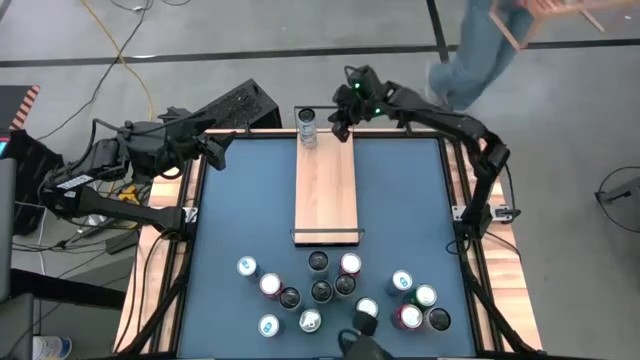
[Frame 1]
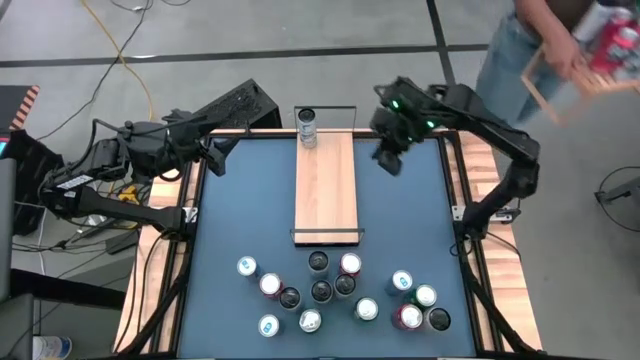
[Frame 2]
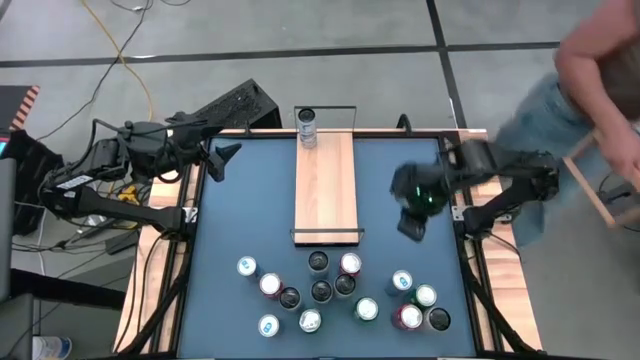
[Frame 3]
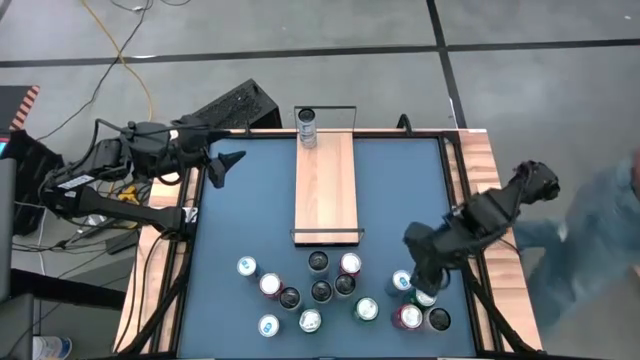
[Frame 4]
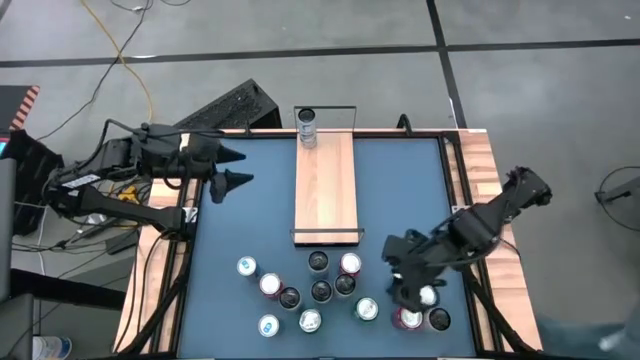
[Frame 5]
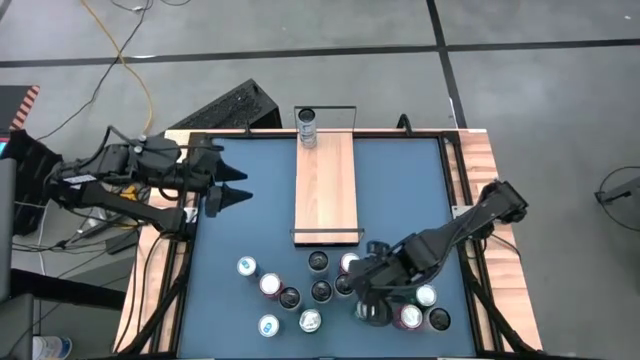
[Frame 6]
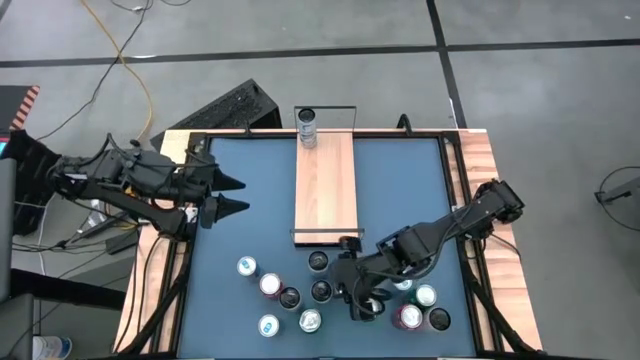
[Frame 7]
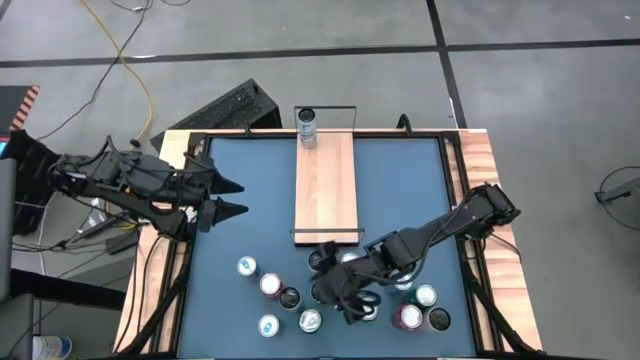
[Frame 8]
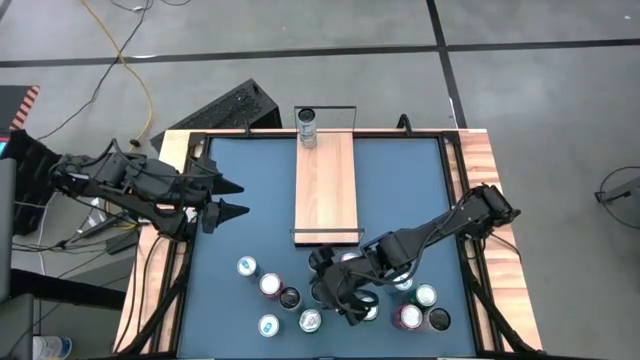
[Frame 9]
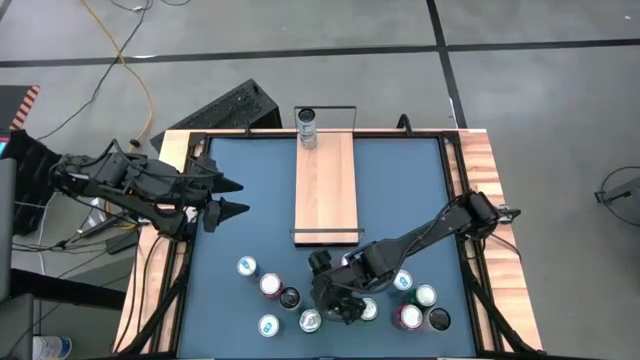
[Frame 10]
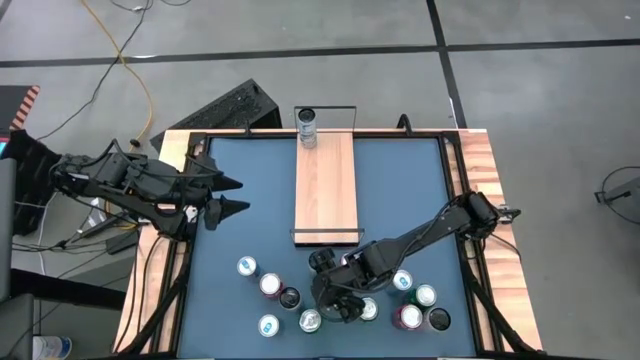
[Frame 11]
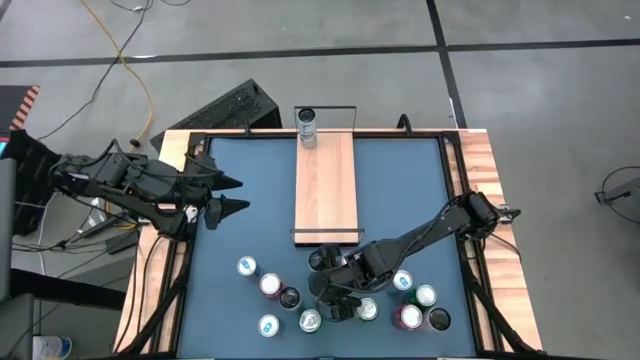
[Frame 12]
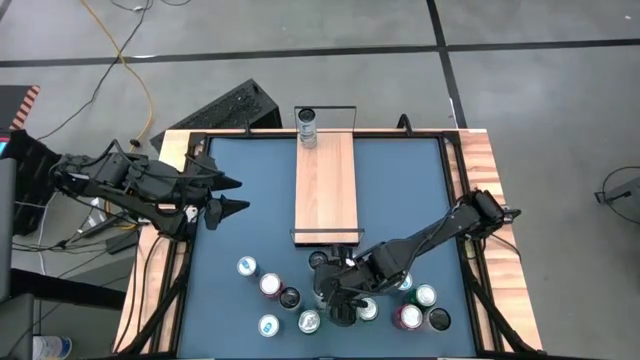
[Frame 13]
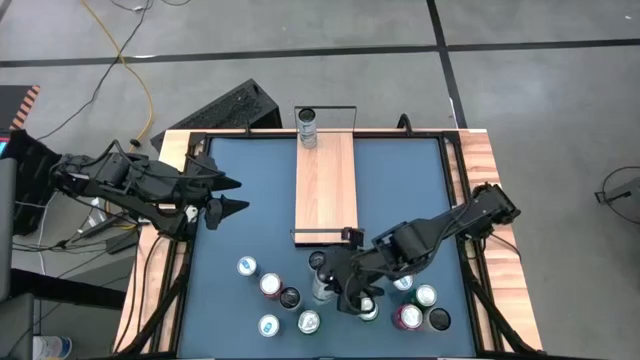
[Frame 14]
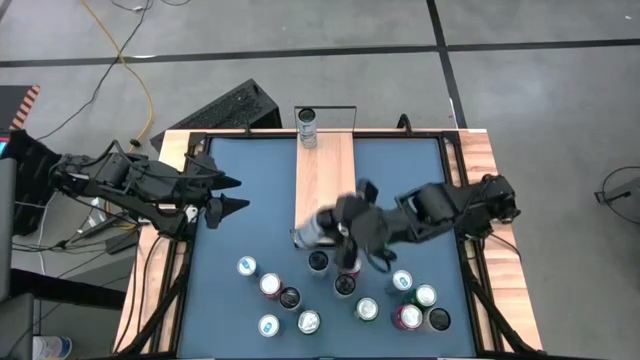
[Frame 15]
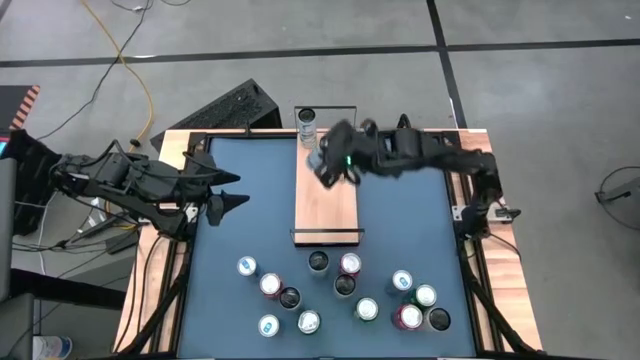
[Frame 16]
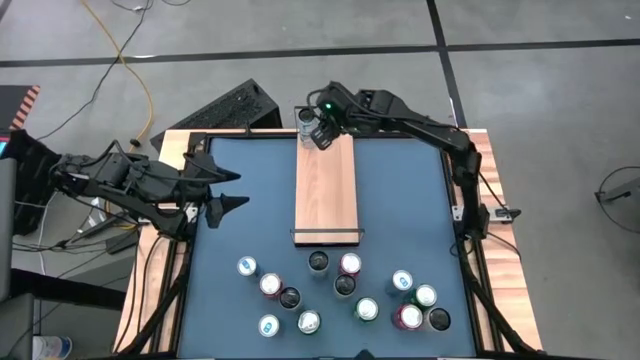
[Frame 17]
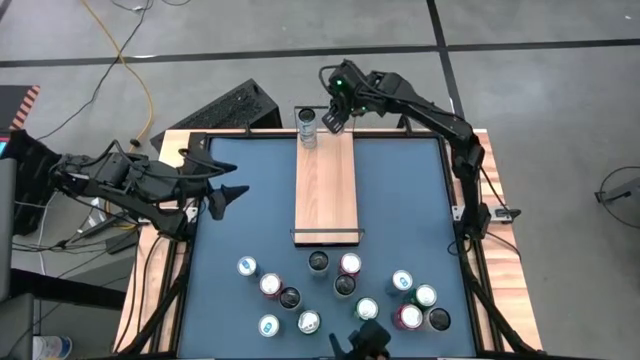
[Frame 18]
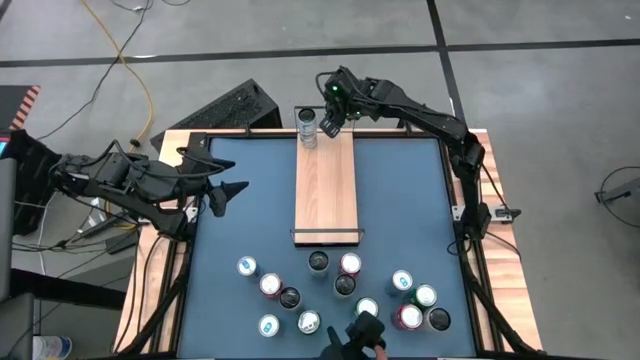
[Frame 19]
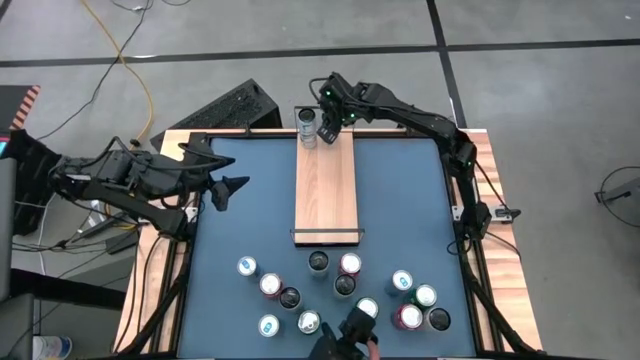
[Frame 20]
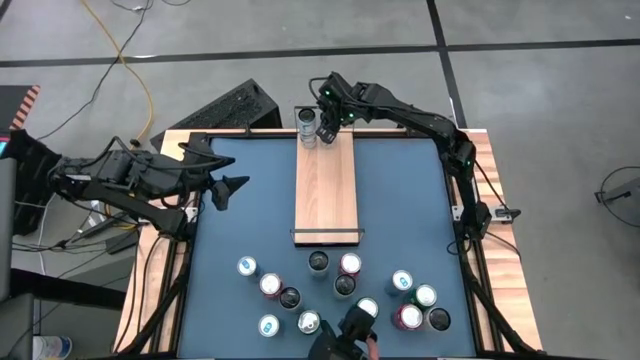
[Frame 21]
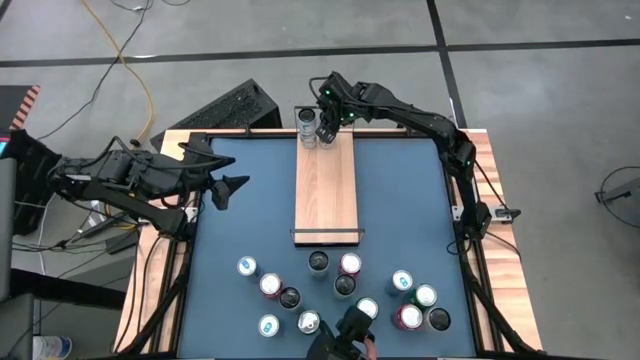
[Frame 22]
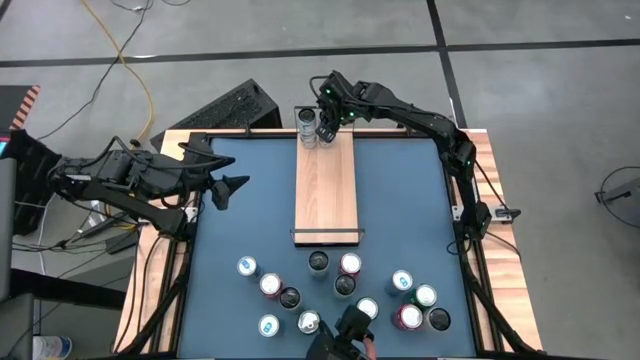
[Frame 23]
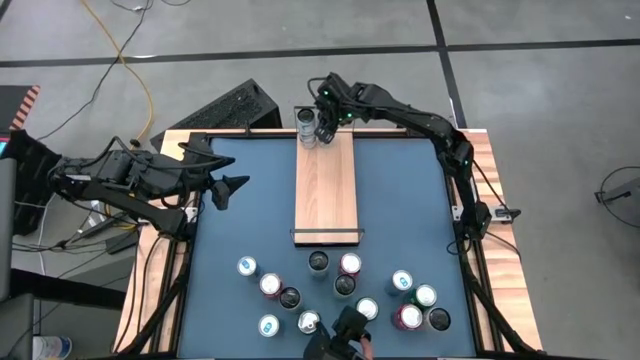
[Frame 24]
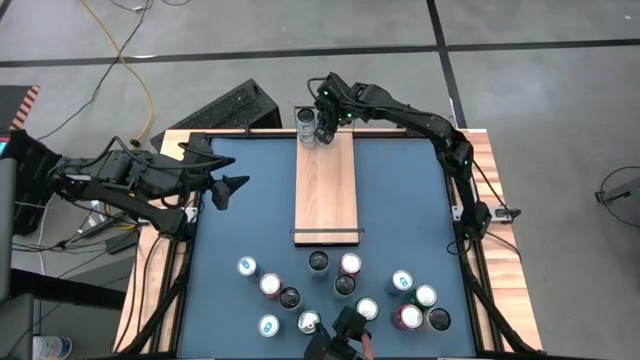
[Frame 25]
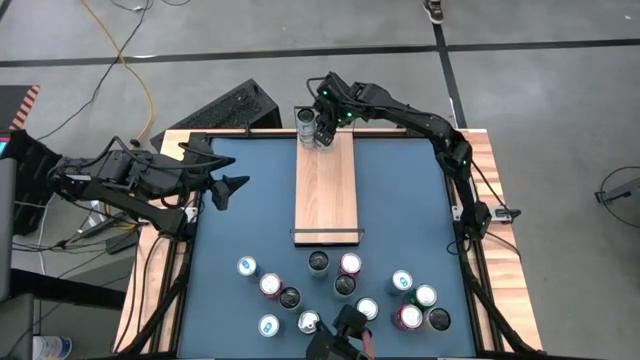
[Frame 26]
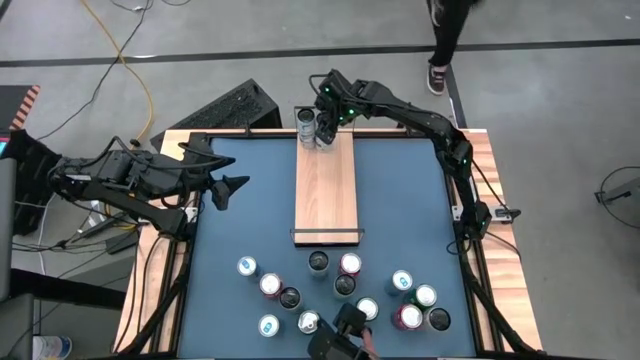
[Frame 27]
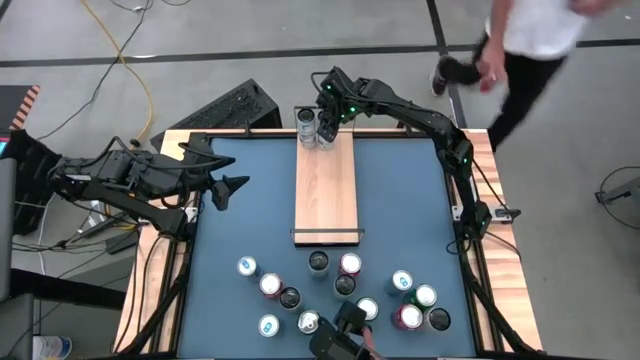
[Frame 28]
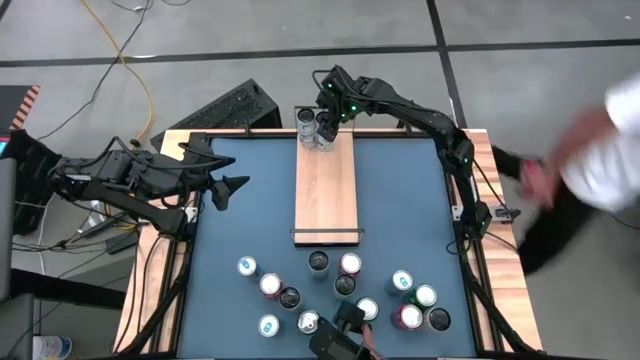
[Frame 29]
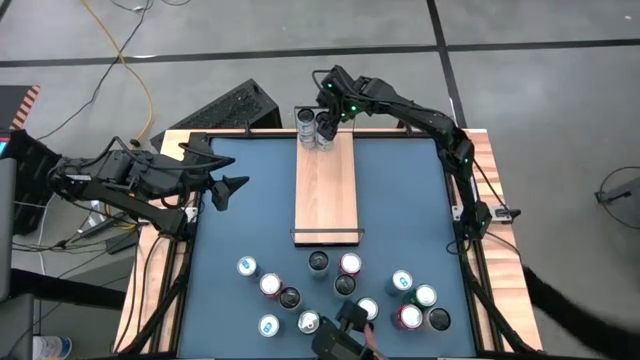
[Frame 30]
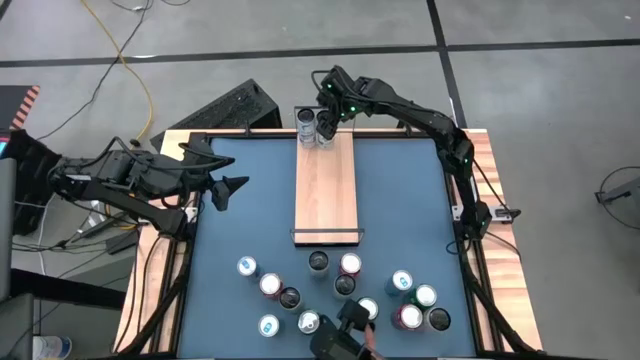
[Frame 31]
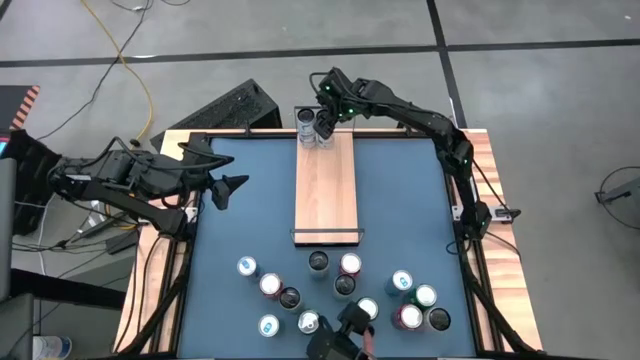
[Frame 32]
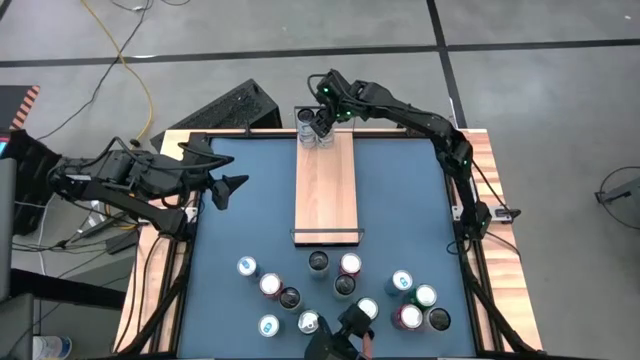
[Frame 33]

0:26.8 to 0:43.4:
Task: Place canned beverage on shelf
Put the bottom white blue soda can on the shelf aligned with the other white blue soda can

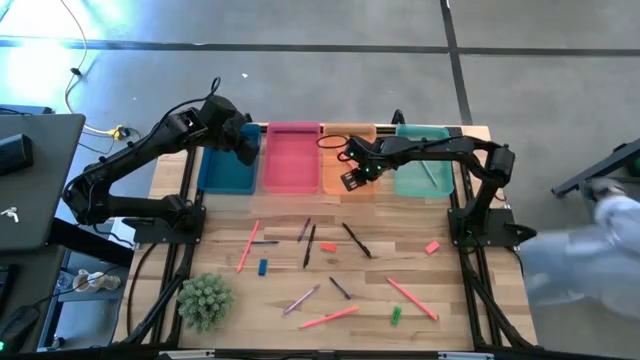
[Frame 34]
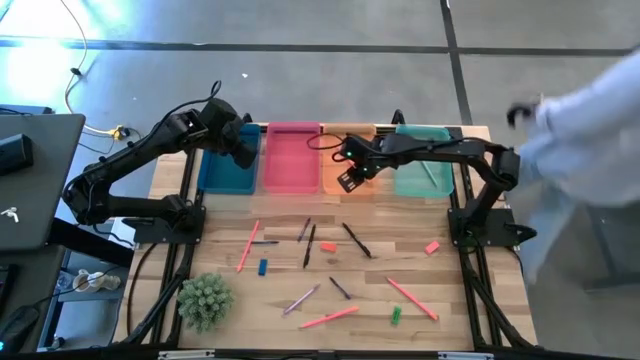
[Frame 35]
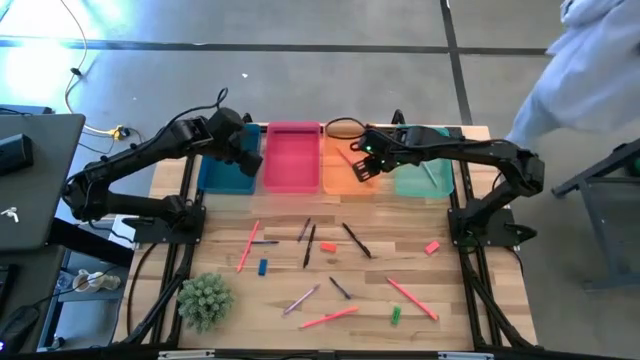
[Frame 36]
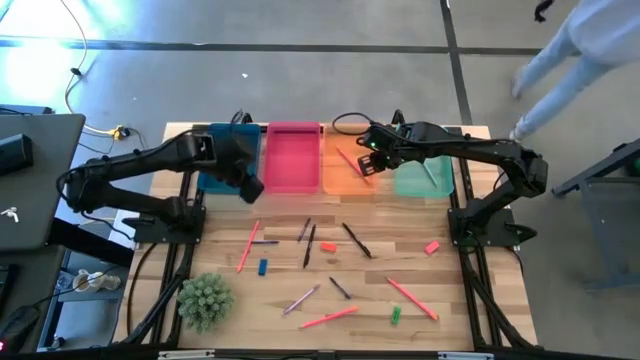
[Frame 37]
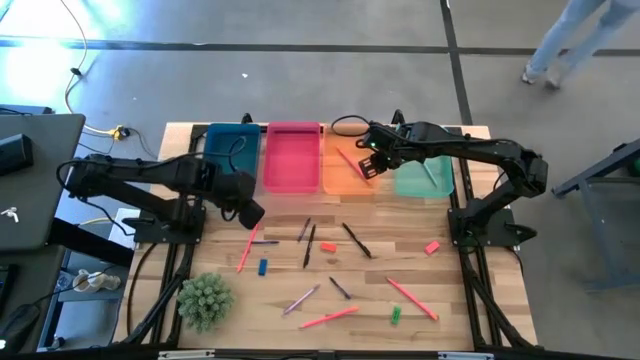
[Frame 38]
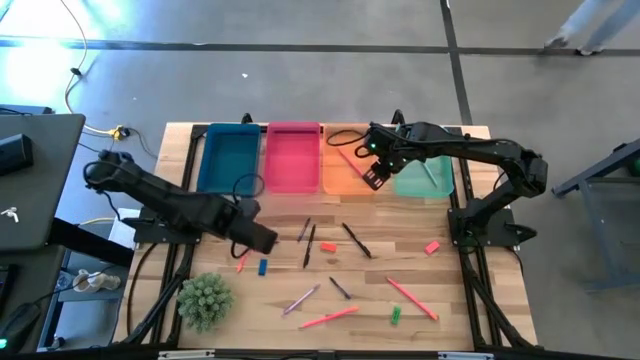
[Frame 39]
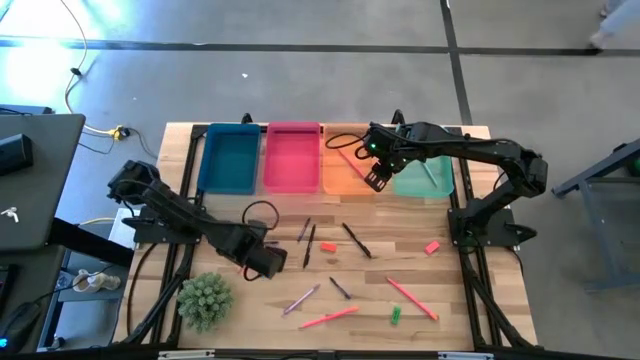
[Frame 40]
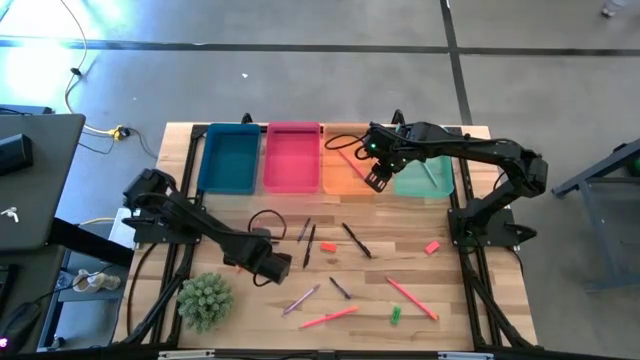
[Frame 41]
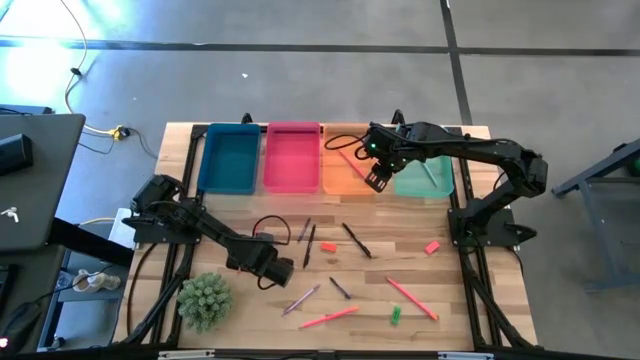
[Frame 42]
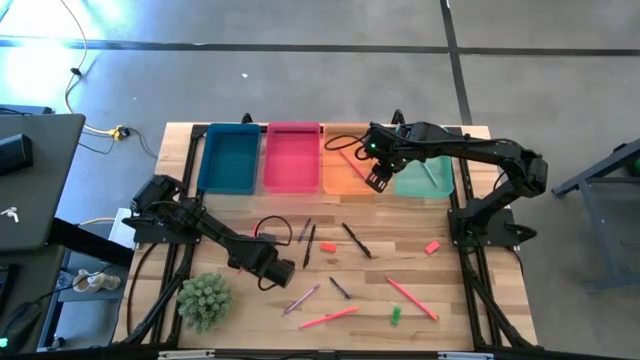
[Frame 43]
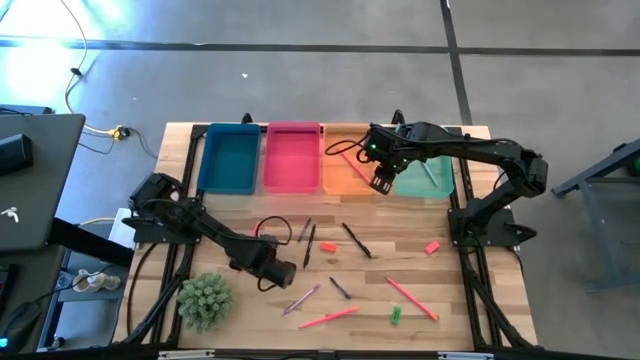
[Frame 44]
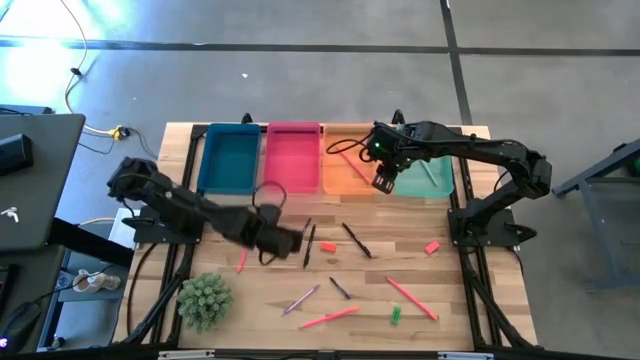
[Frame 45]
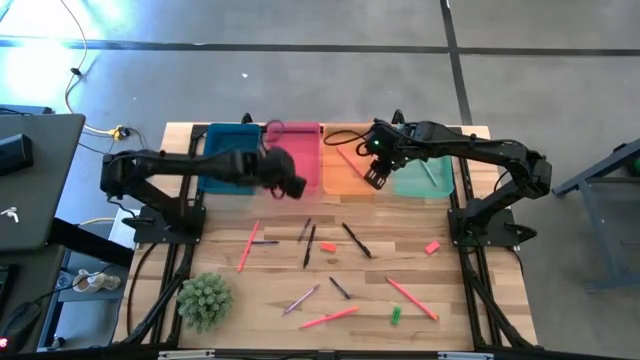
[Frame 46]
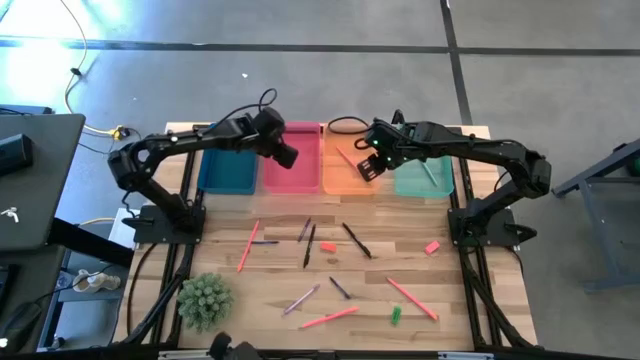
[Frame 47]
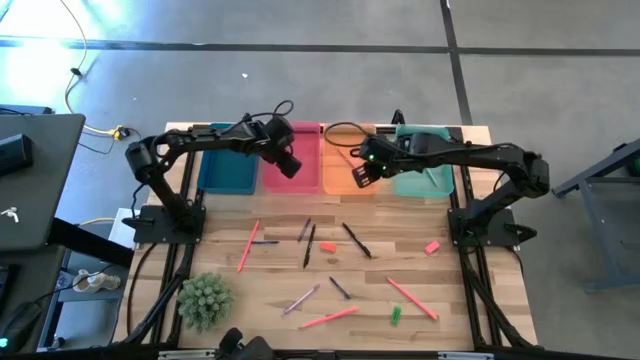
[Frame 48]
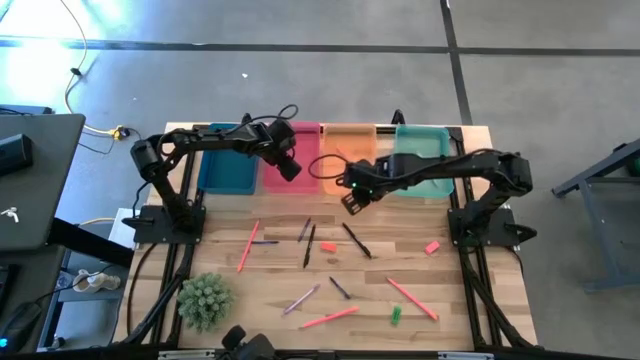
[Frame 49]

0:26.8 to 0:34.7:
Task: Sort crayons/erasers/pens/pencils in bins
Put the blue eraser into the pink bin
